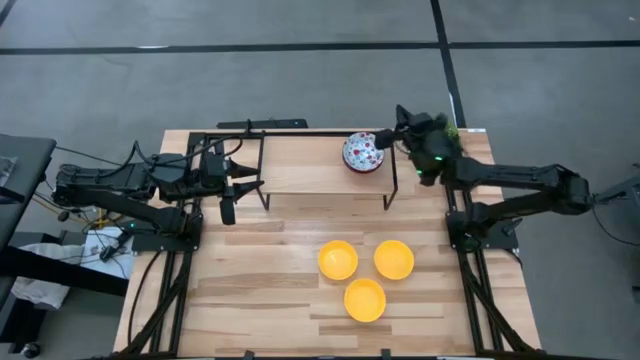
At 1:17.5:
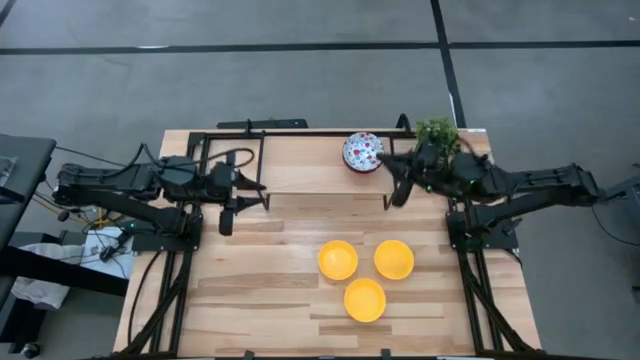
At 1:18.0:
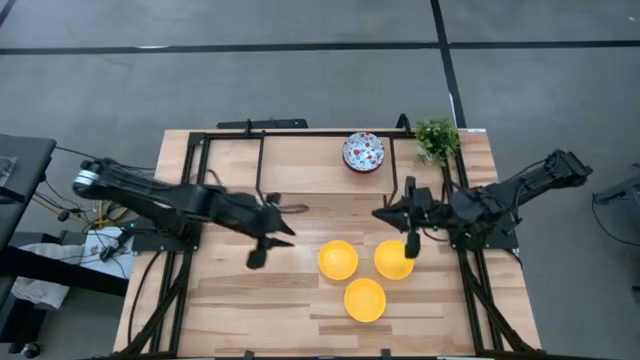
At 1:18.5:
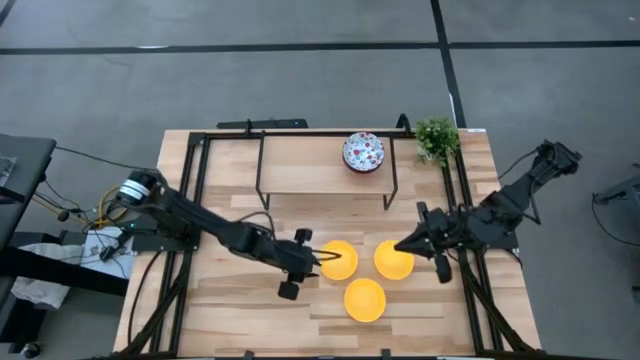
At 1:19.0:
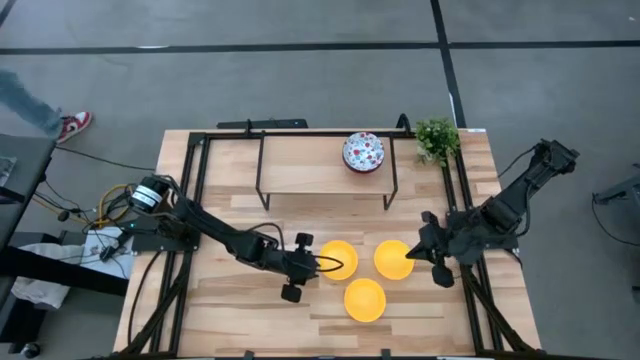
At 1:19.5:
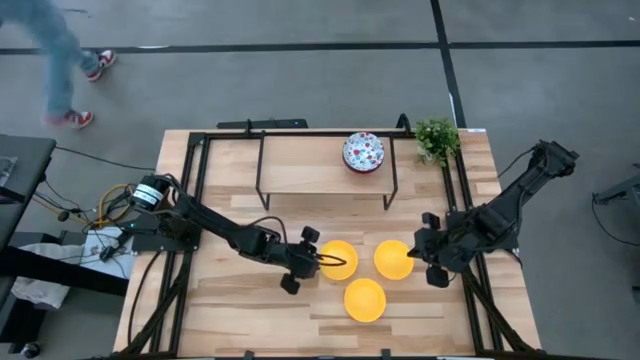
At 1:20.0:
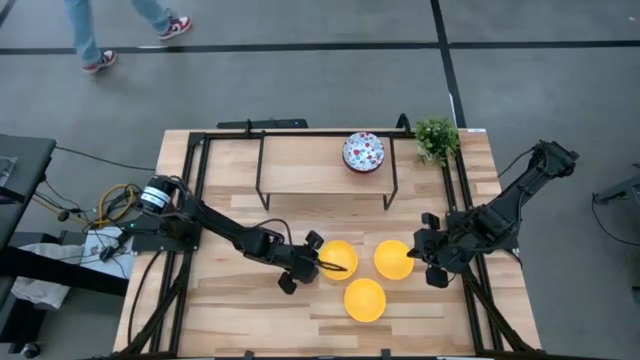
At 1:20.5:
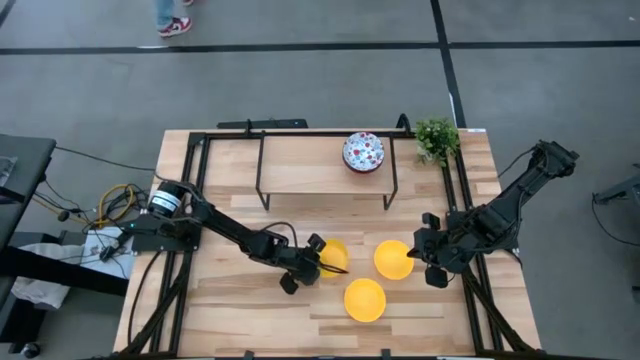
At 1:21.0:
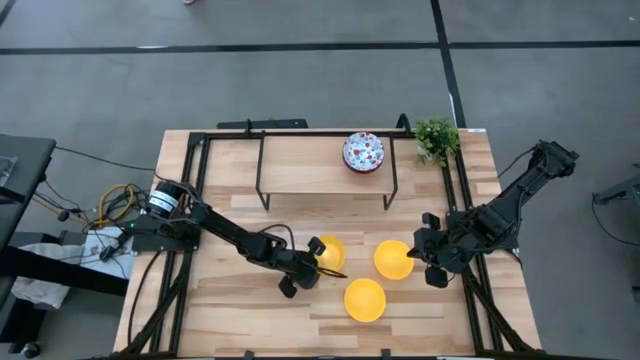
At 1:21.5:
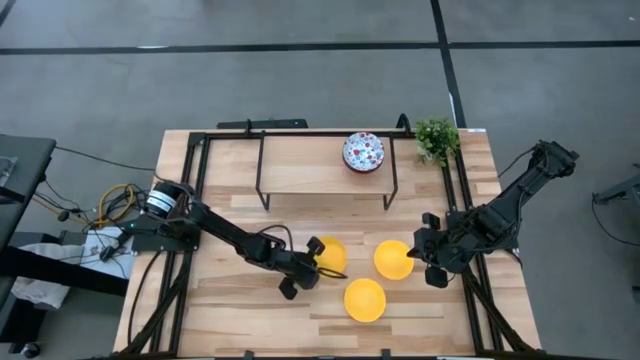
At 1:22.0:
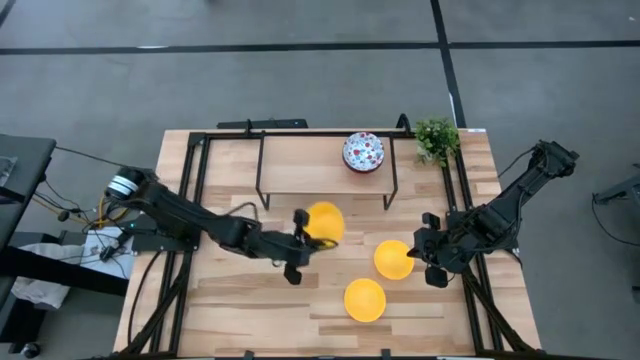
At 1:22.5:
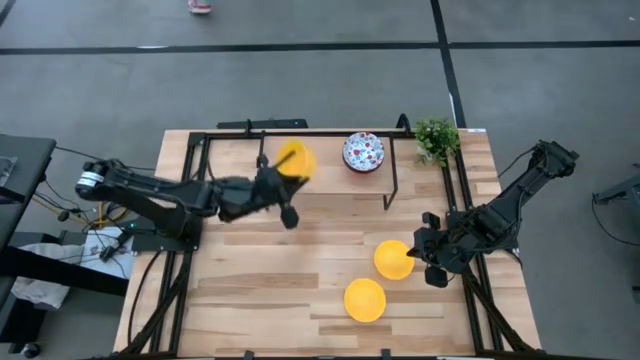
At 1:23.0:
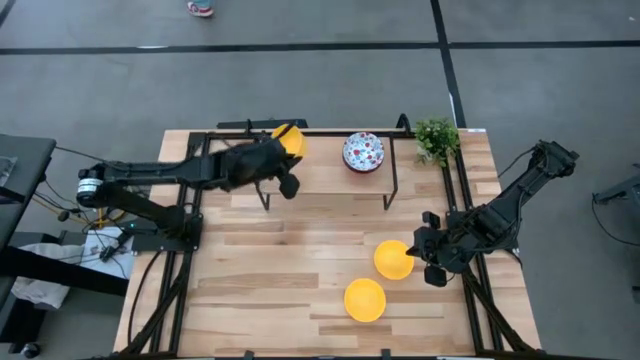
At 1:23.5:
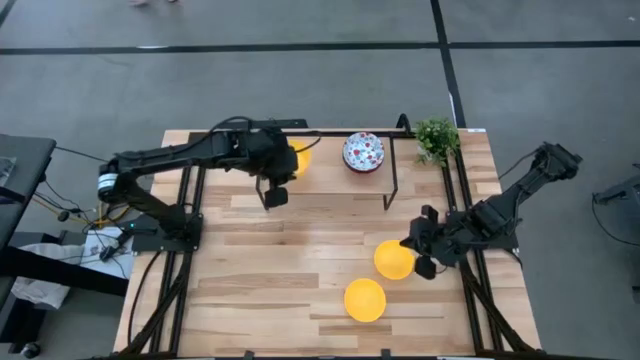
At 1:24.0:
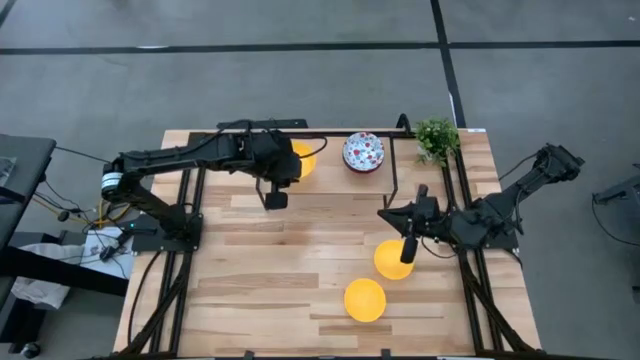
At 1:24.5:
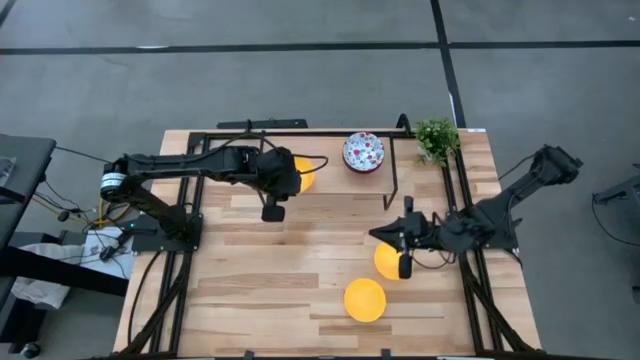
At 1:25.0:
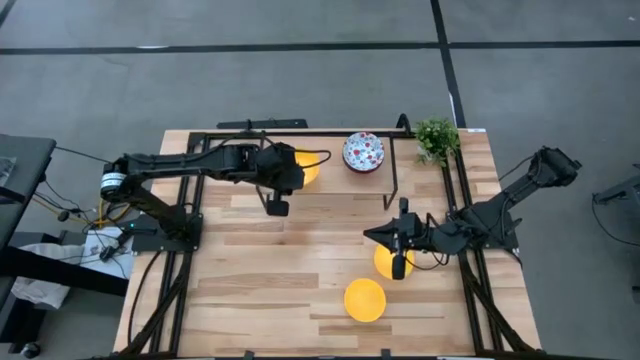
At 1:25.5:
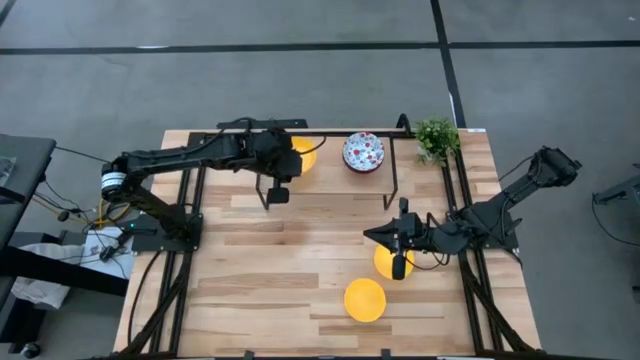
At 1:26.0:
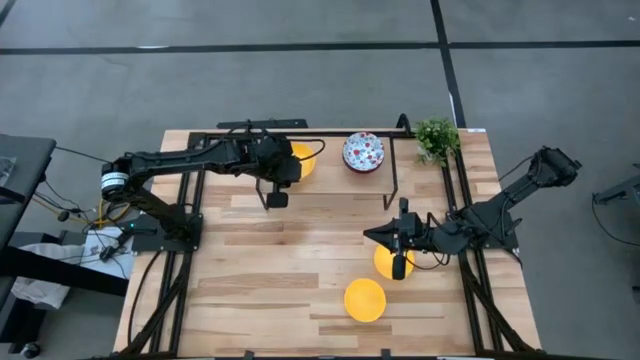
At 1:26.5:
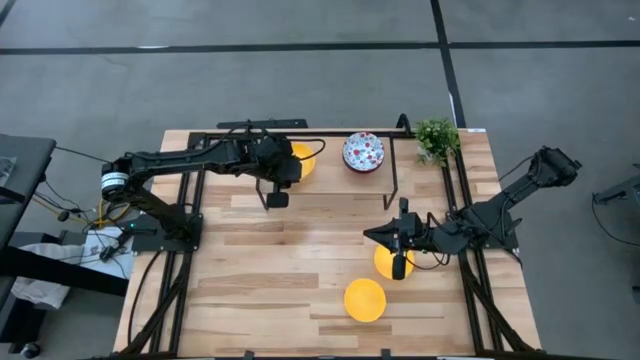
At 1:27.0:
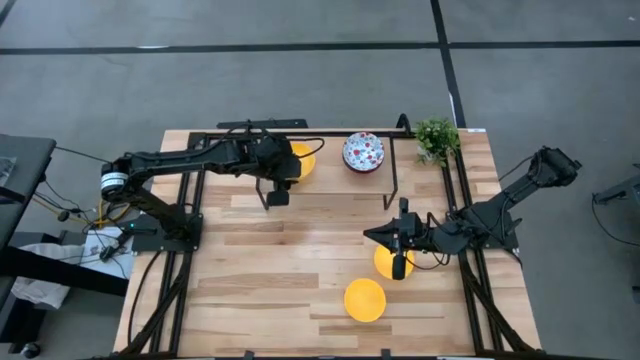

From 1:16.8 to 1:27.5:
Task: Pick & Place Mini bowls
Put the top left yellow bowl on the shelf

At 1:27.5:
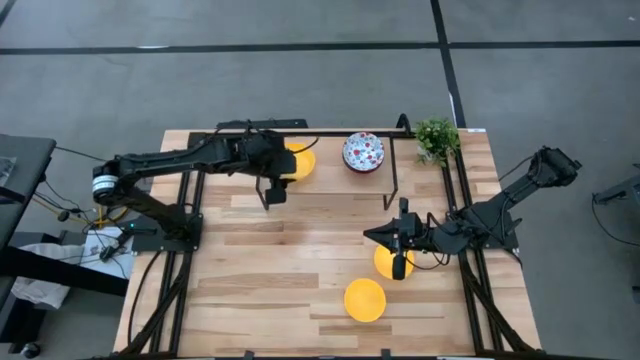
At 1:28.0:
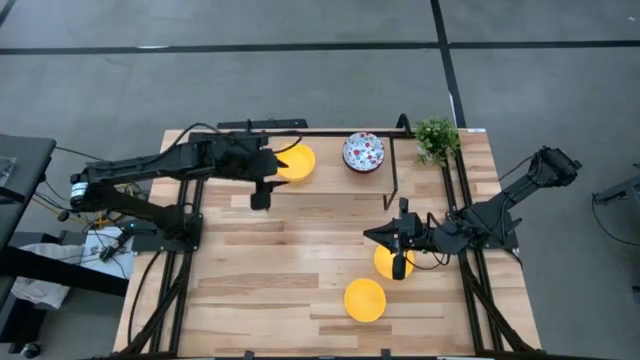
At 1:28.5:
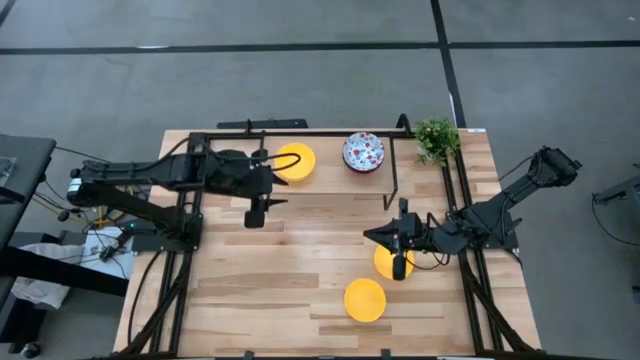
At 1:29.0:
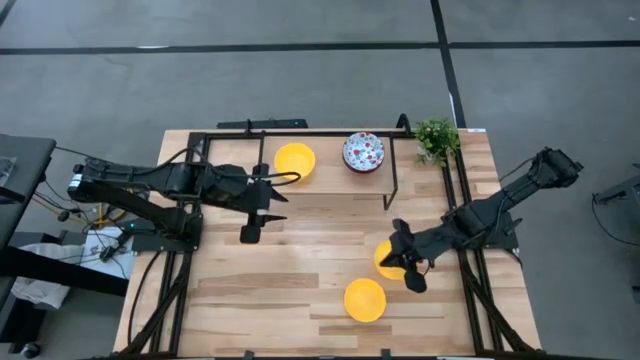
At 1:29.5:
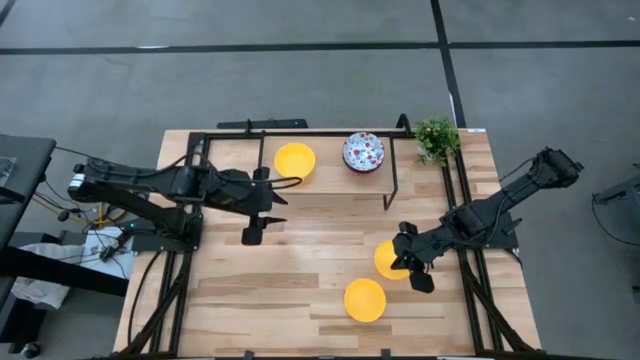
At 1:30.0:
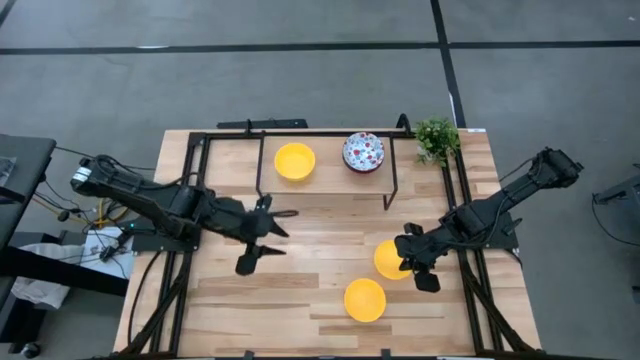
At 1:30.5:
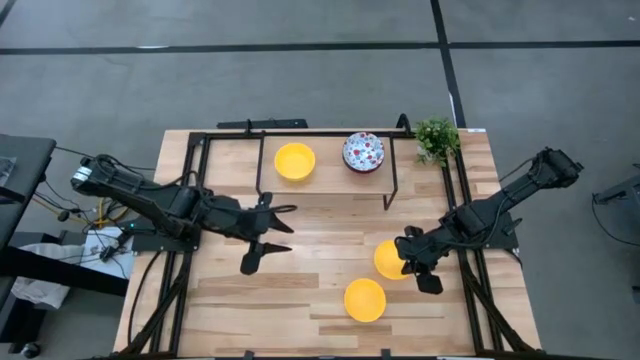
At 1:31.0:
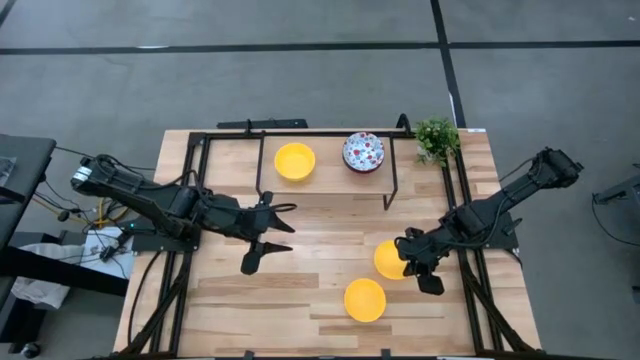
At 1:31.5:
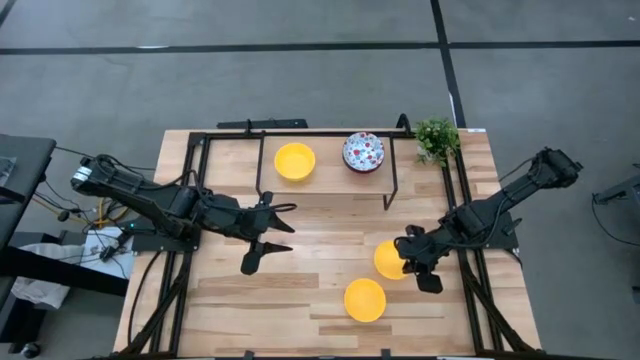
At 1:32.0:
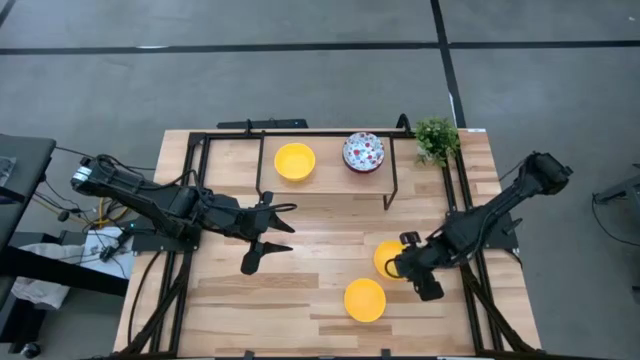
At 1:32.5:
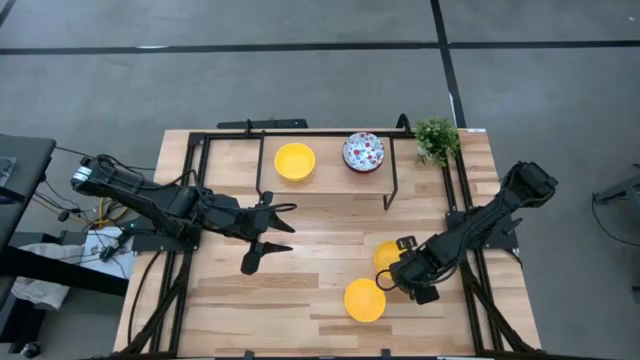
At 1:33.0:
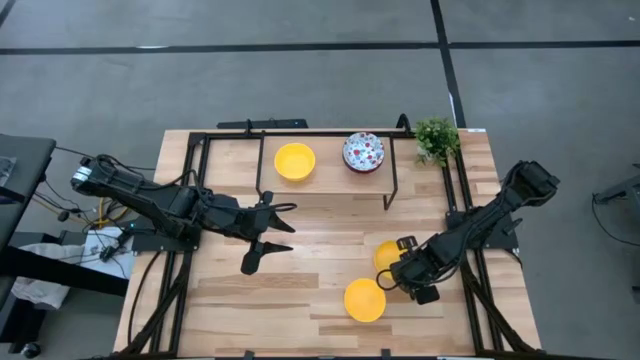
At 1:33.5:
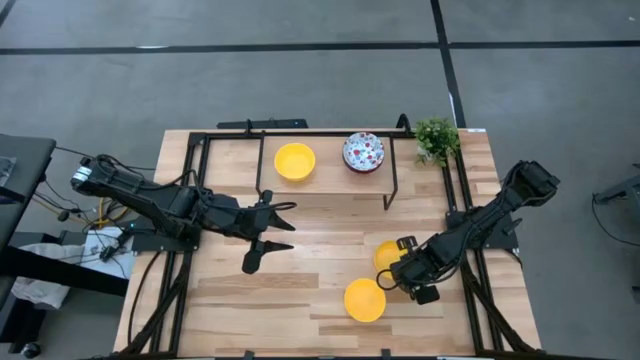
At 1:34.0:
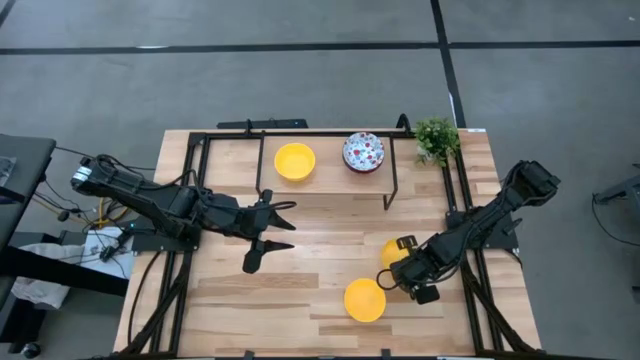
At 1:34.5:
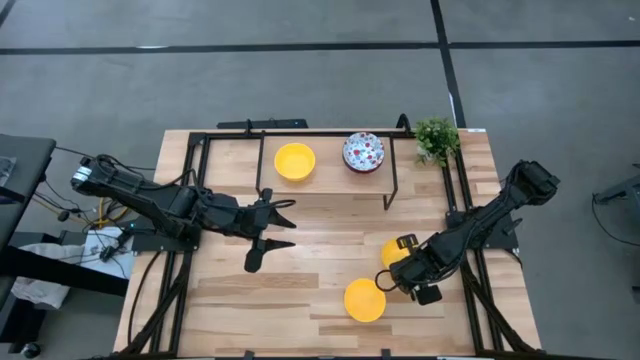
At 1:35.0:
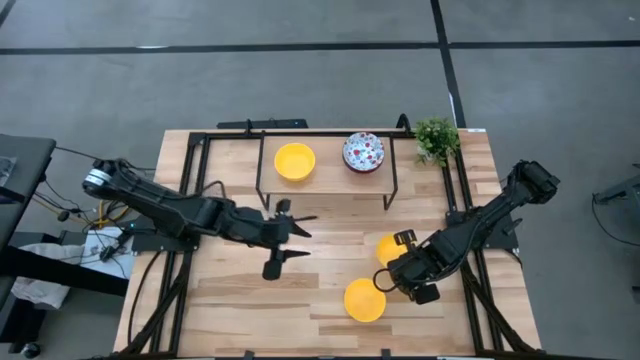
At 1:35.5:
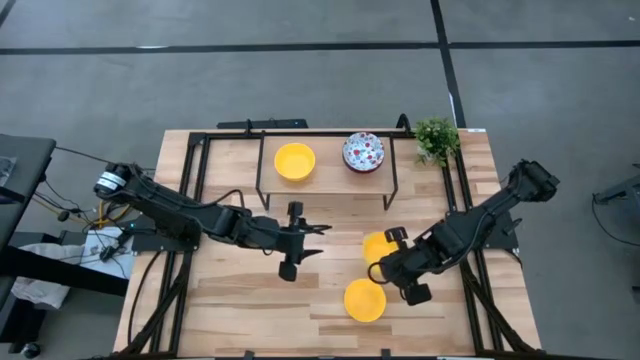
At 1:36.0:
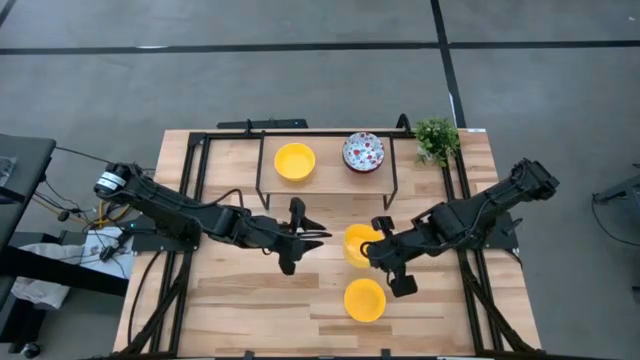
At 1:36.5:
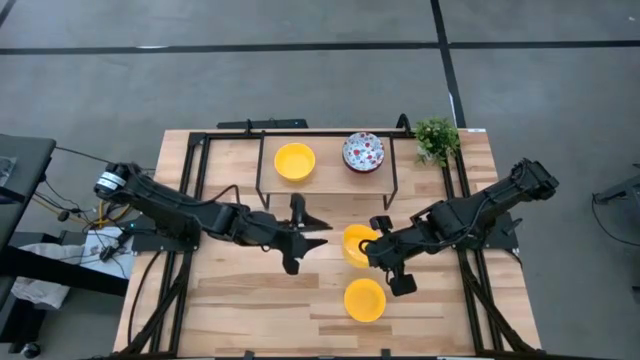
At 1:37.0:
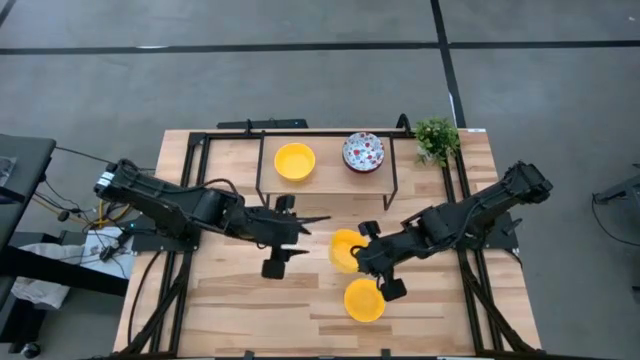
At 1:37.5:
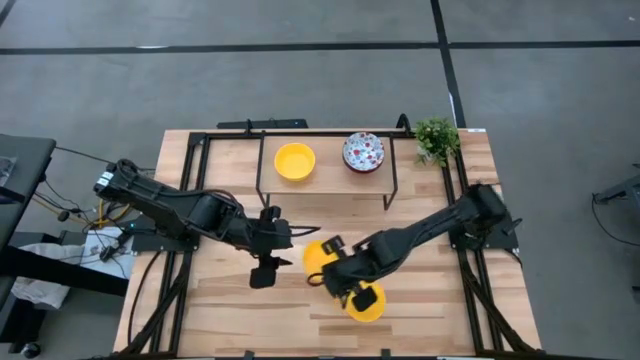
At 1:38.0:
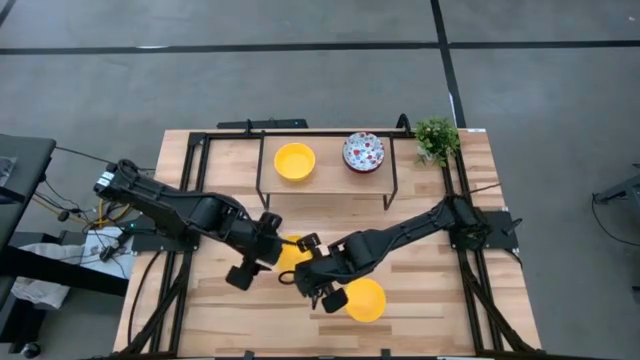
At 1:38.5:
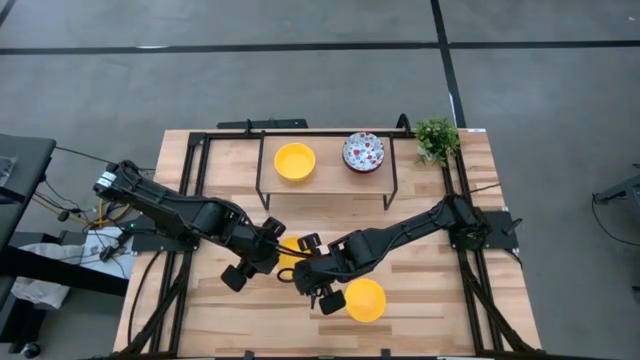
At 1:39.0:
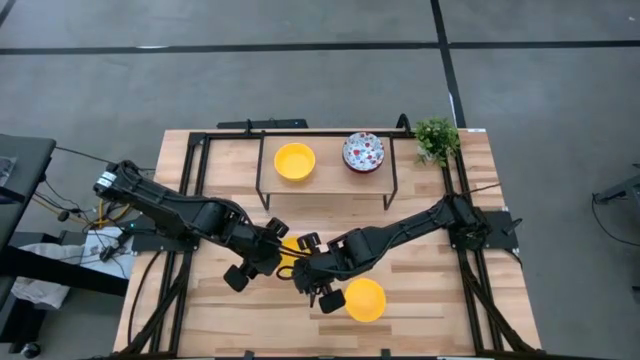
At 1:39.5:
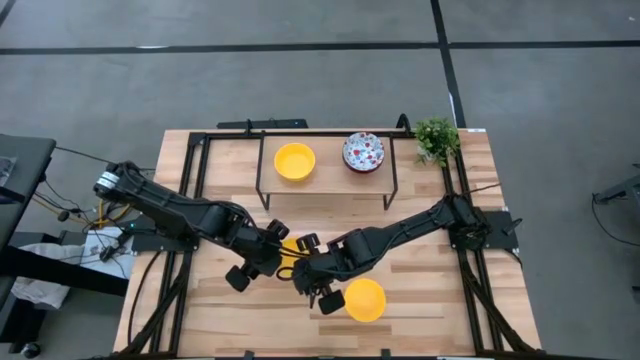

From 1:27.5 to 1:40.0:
Stack the top yellow bowl on top of the yellow bowl on the shelf
